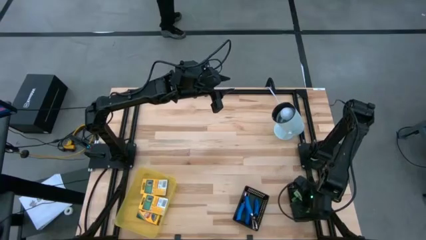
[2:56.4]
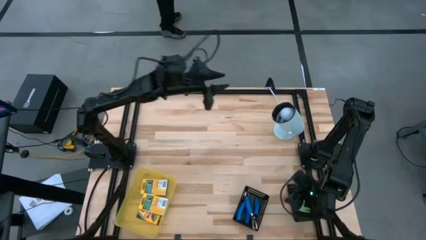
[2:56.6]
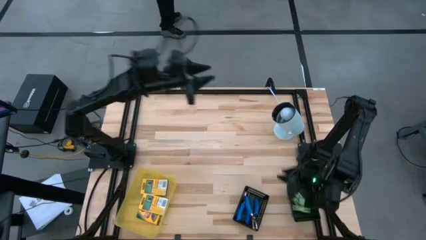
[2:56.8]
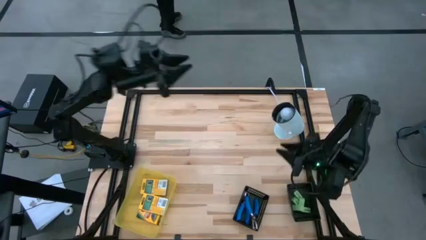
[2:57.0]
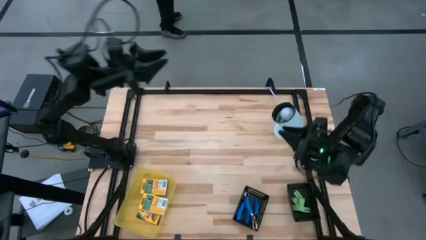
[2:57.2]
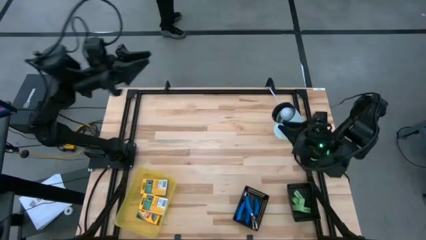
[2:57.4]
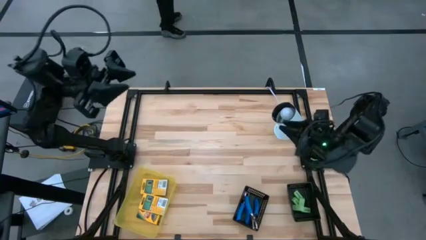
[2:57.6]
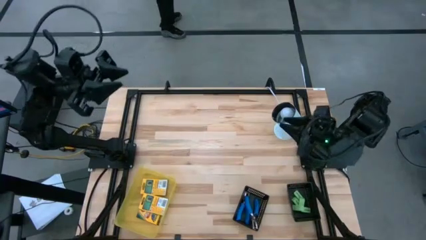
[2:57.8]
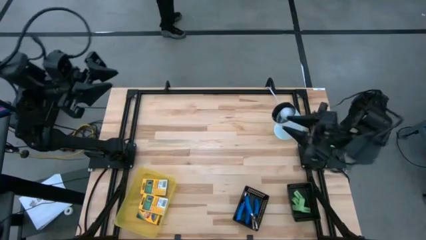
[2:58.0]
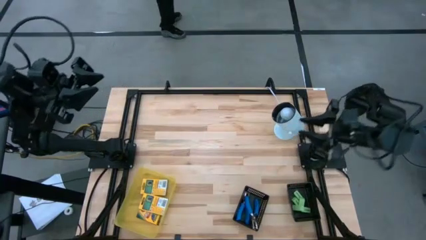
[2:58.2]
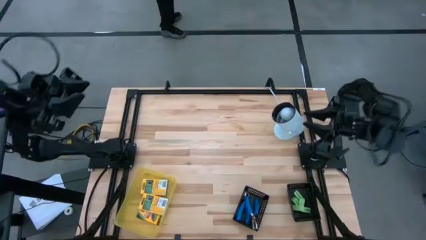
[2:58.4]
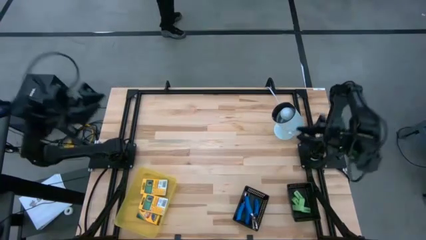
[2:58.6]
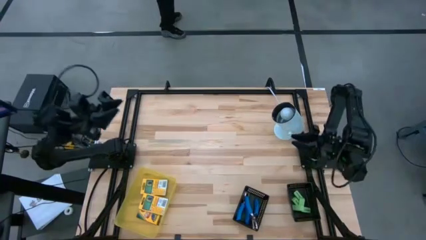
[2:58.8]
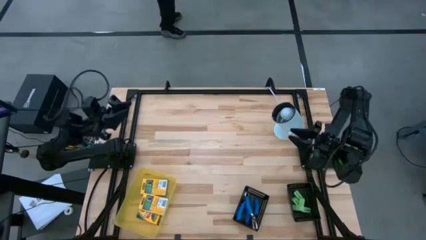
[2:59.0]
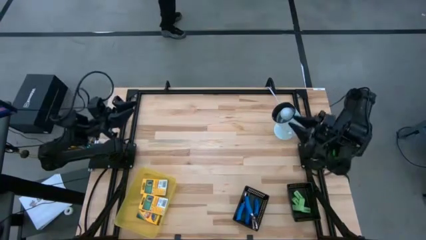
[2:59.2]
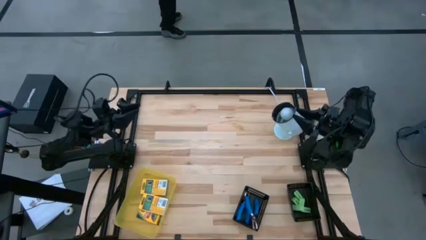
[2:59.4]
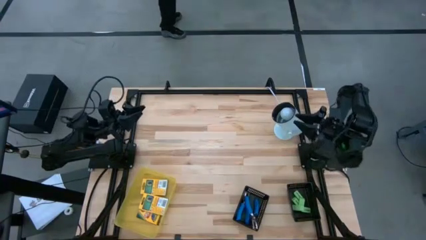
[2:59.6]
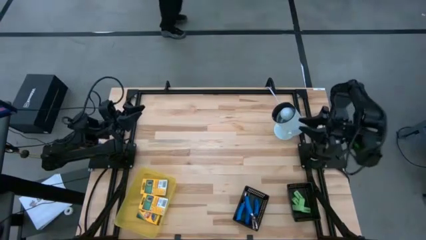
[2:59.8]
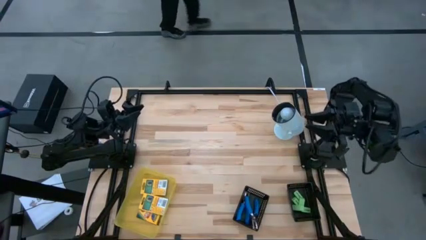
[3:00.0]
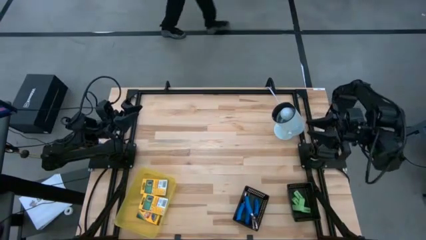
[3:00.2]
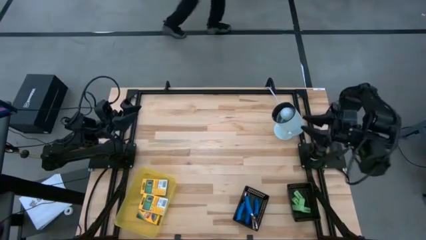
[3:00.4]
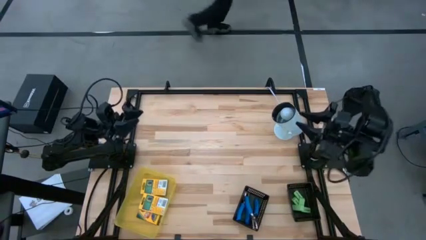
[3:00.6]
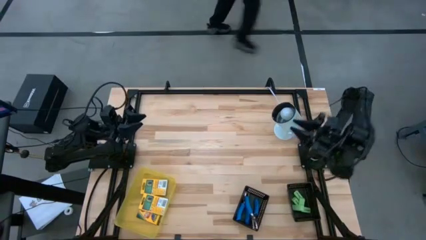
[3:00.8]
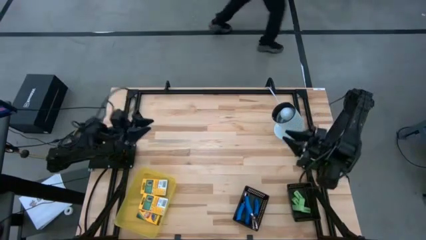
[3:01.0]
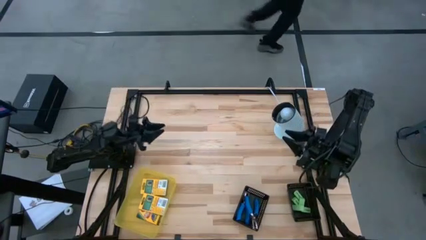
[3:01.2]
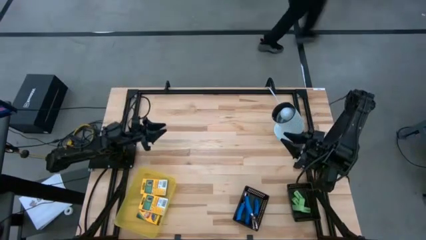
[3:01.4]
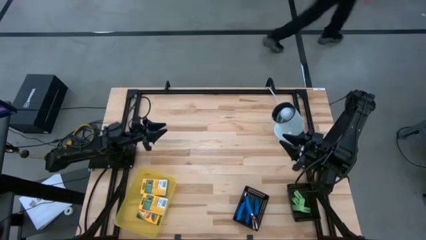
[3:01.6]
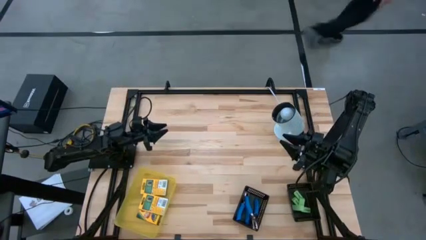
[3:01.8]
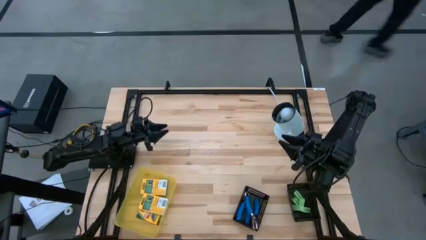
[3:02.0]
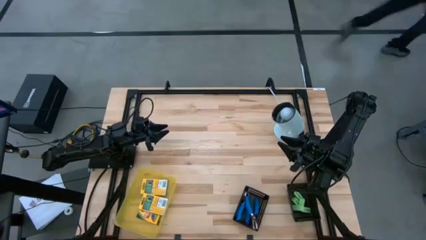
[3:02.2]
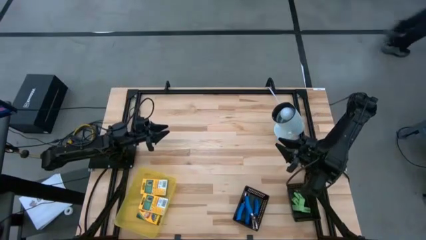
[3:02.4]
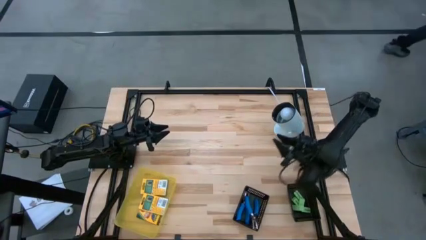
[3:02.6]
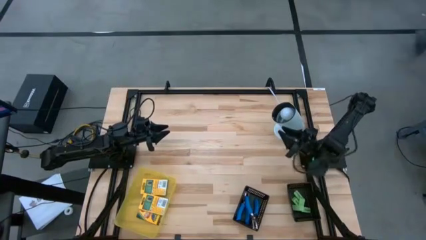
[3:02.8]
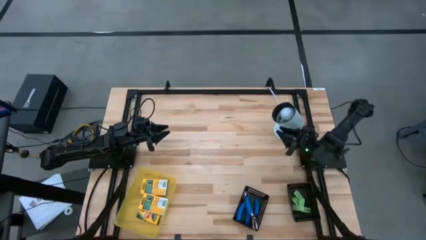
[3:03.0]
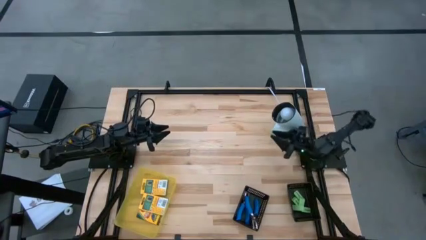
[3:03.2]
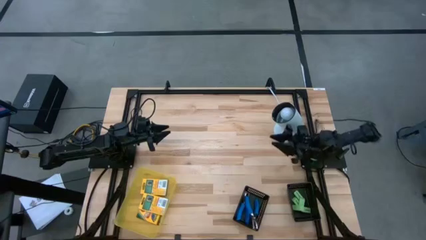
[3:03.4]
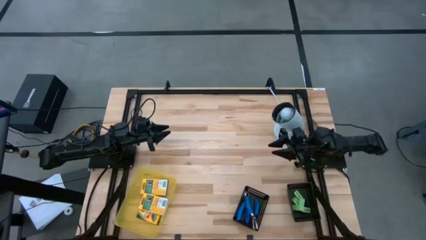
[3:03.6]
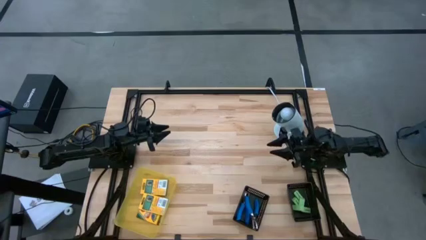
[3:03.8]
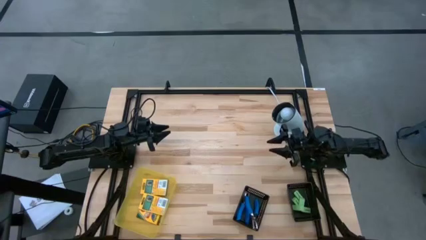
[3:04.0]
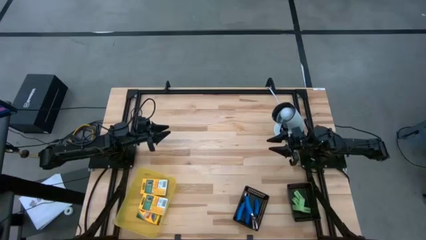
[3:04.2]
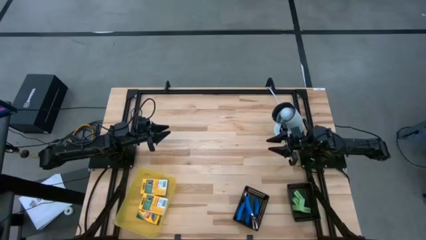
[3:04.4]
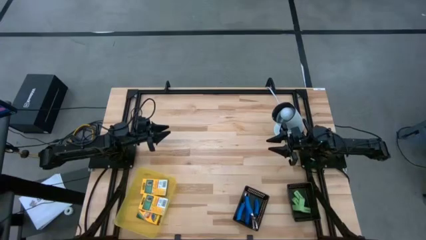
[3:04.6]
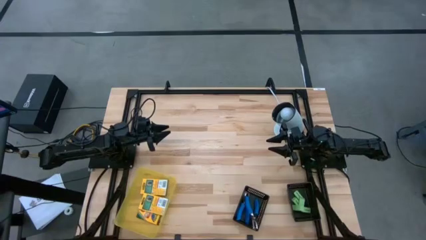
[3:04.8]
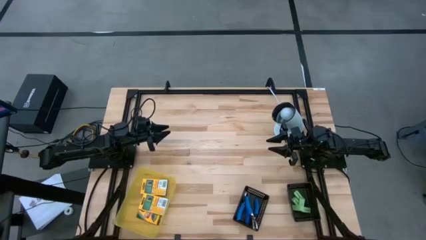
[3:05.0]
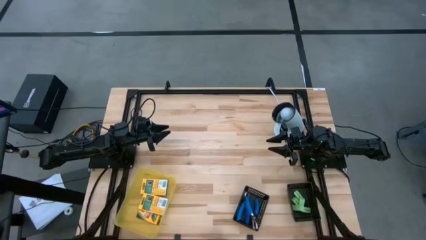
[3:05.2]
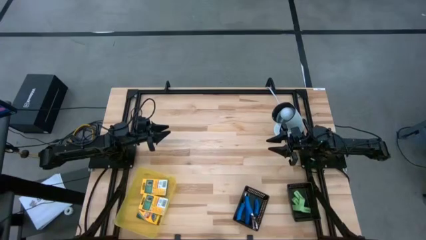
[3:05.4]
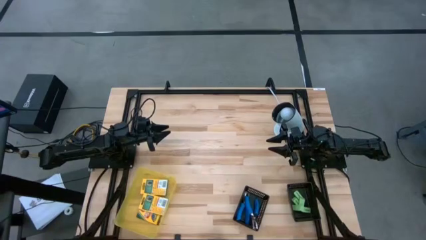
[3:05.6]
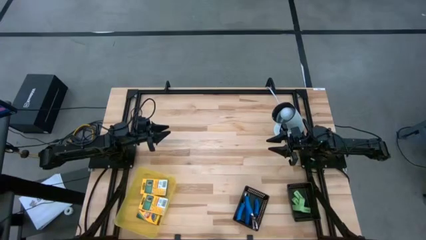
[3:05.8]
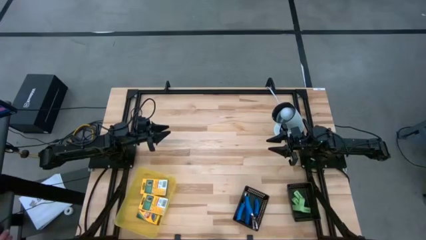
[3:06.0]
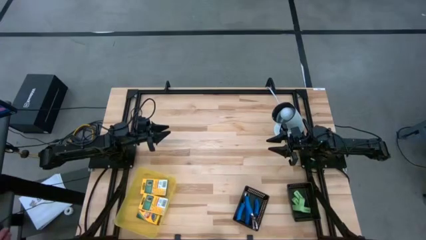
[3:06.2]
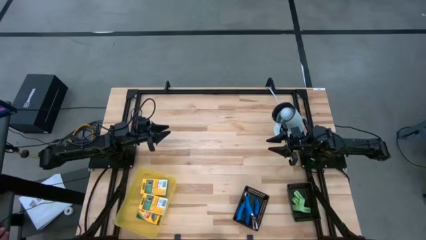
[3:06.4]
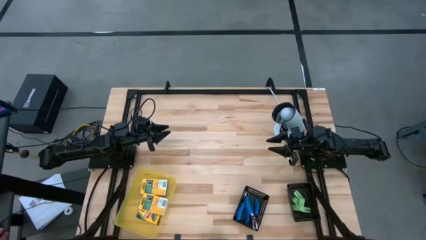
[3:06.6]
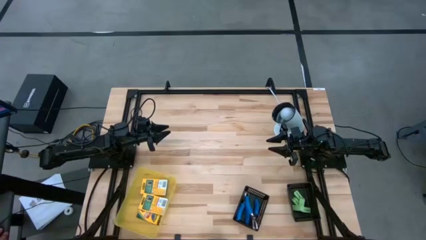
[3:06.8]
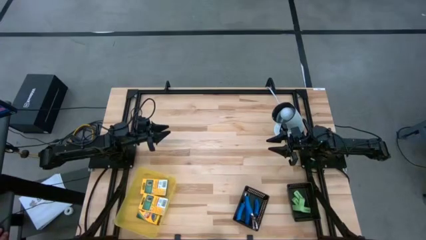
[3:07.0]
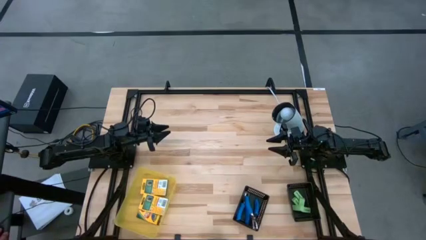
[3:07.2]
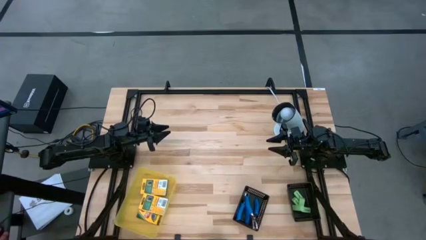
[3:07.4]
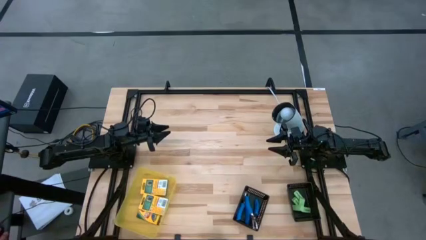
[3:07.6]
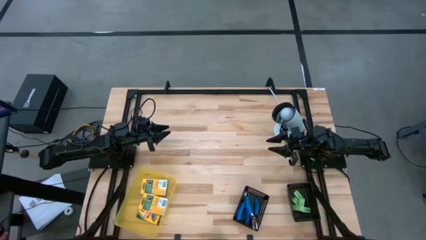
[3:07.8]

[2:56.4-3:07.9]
Task: Pick & Place School Supplies
Return to Home Position

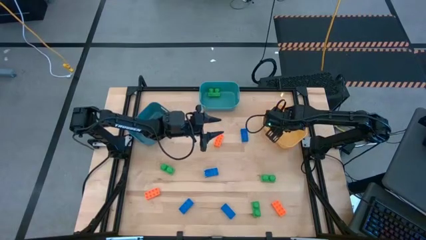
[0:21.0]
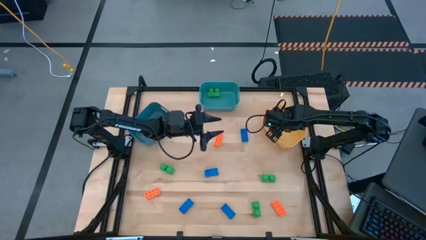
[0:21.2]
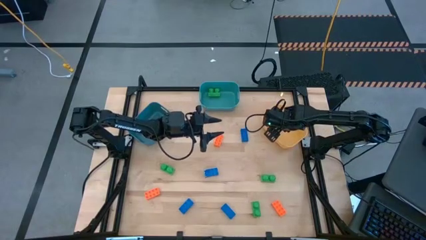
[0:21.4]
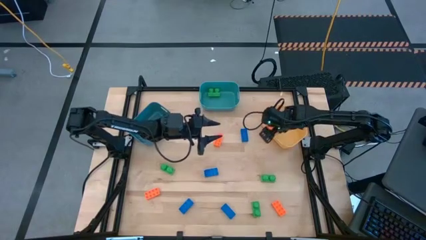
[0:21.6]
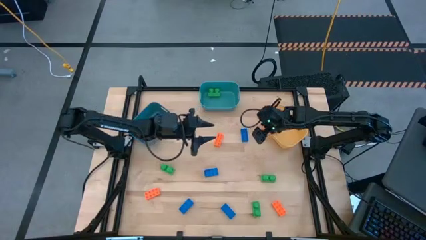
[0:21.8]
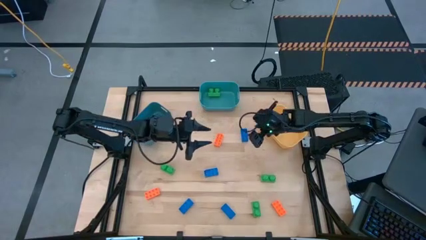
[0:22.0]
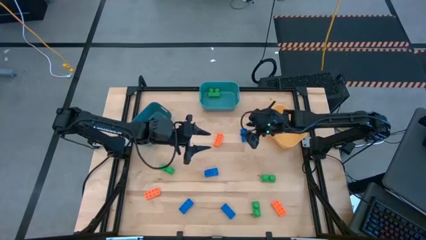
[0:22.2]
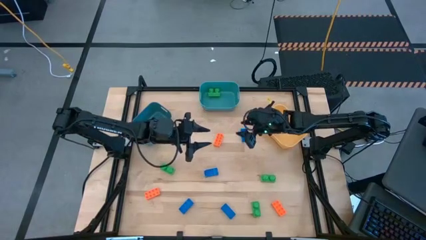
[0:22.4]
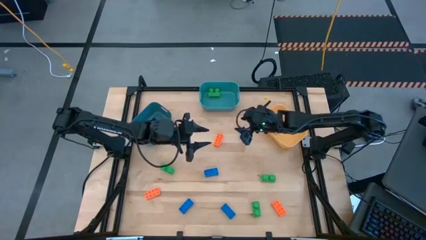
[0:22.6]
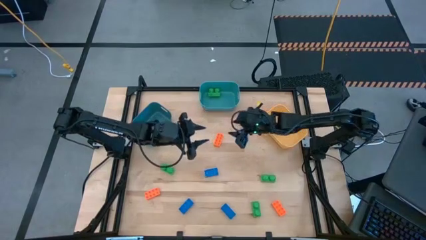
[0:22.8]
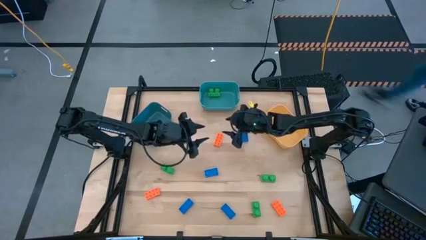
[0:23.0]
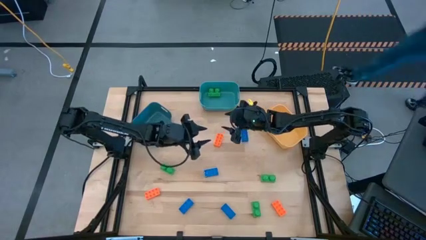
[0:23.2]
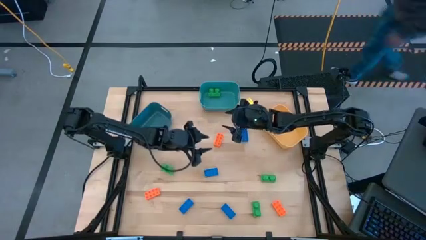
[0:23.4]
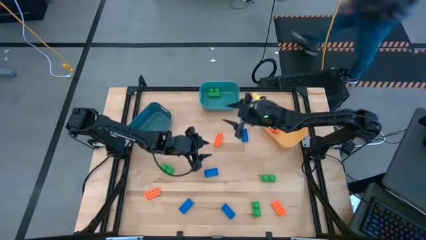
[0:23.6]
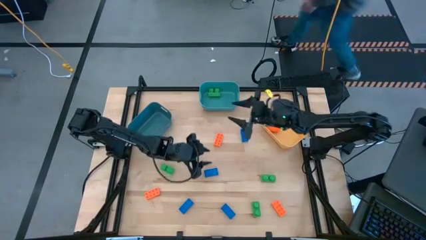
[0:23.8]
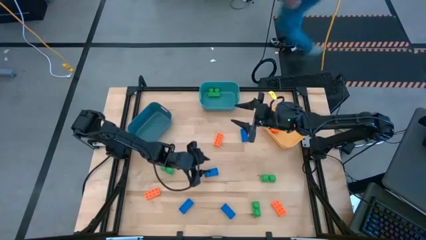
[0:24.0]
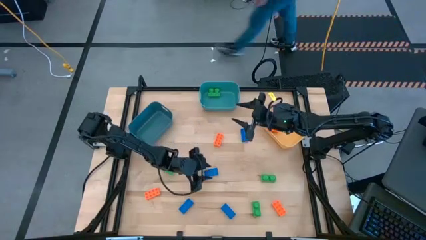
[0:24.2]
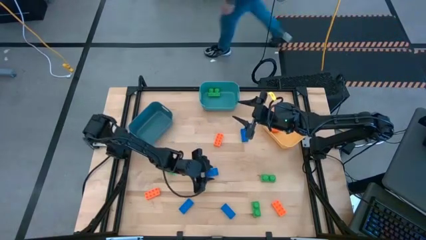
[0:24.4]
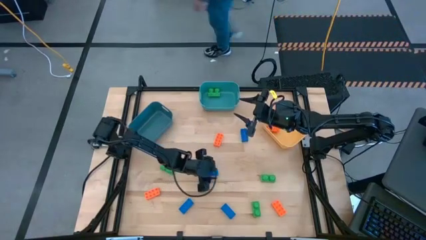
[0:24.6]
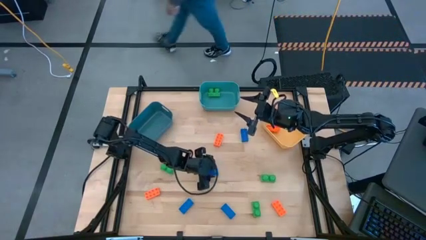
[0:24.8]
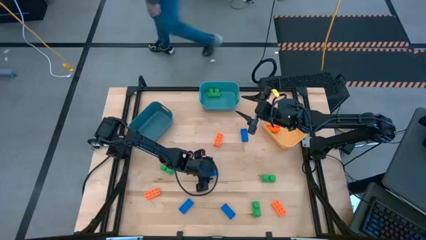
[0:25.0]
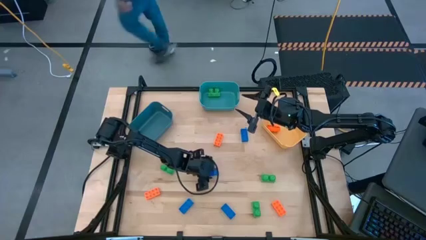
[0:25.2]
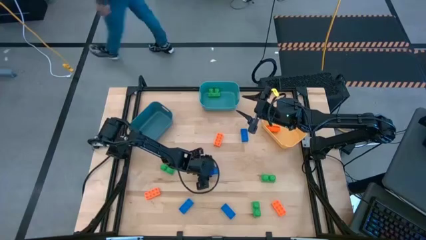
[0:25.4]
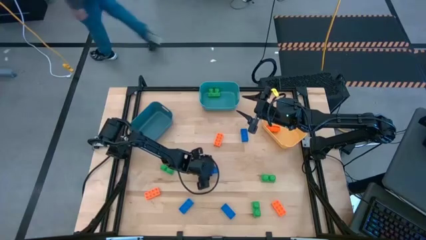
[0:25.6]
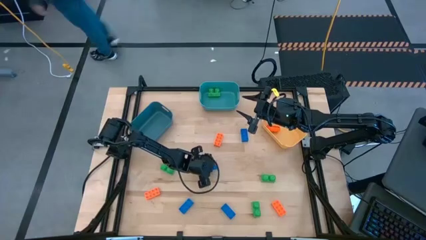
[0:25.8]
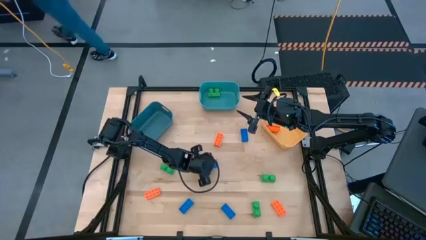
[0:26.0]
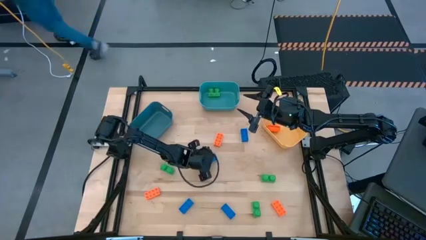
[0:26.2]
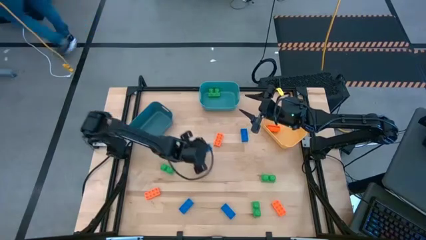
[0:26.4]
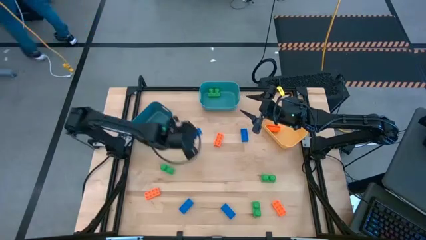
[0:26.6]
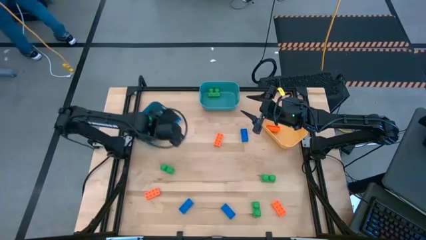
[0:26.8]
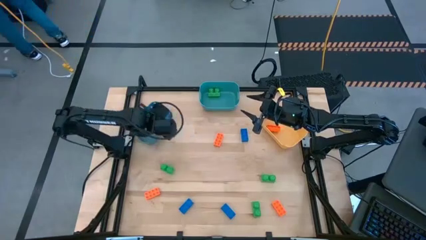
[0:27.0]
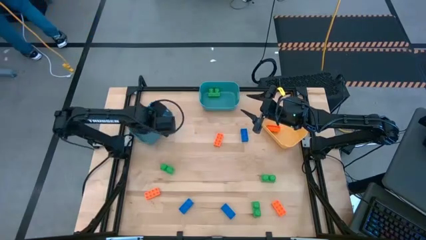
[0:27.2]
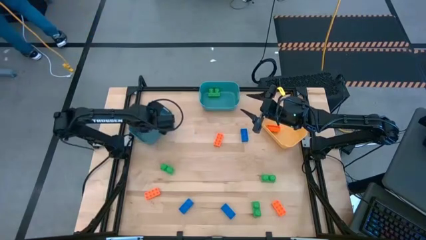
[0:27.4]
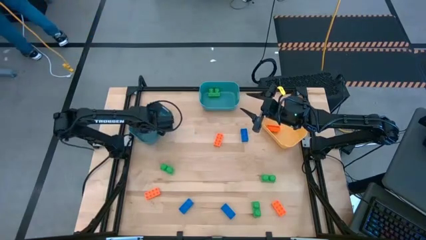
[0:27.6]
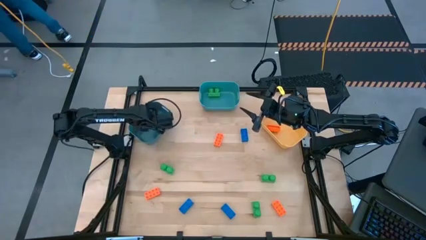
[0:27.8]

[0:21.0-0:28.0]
Task: Sort & place blocks by color
Put the blue game piece into the blue bin
